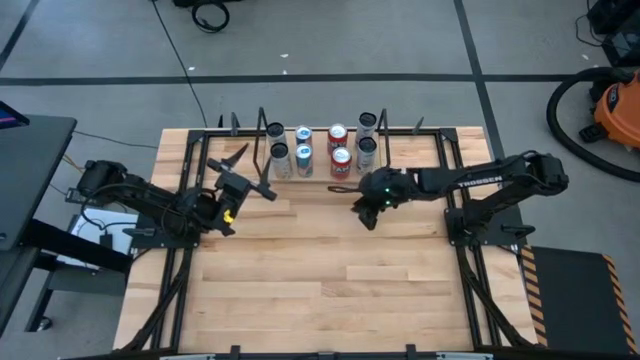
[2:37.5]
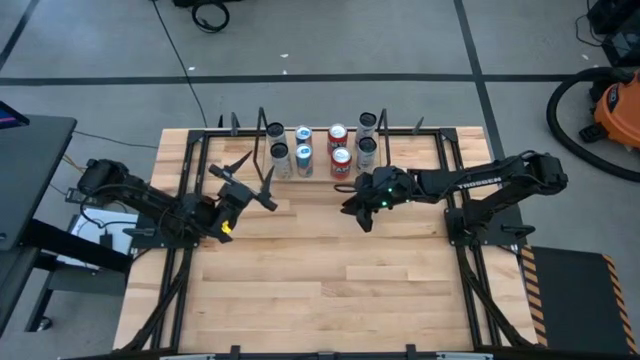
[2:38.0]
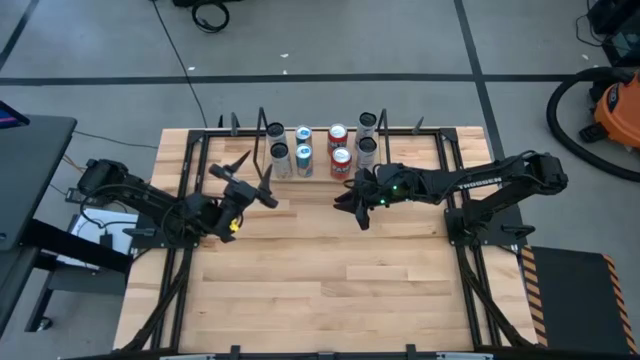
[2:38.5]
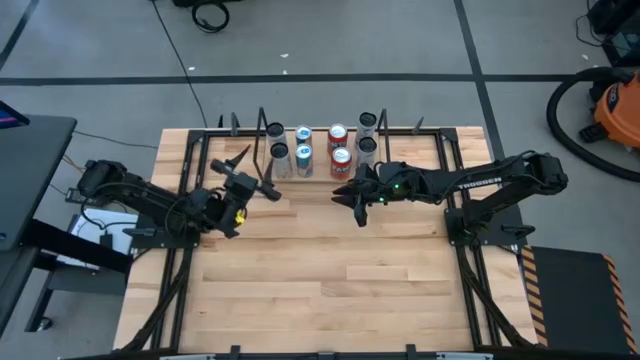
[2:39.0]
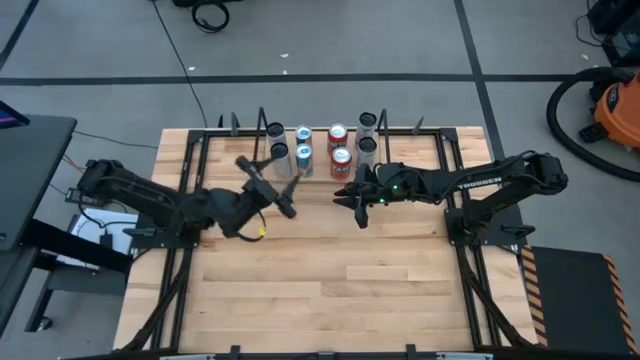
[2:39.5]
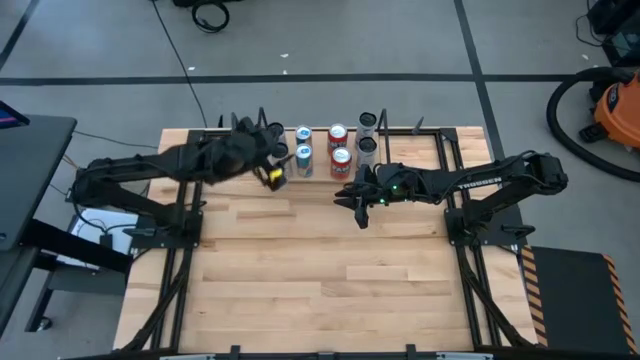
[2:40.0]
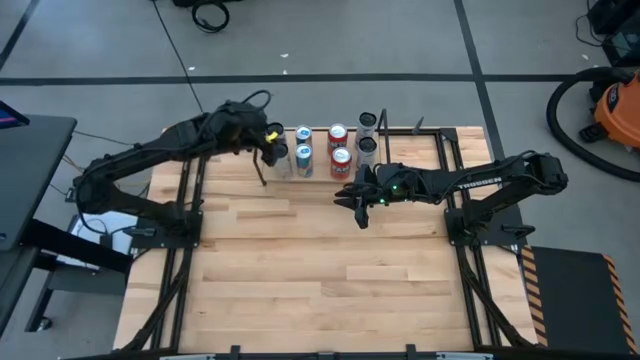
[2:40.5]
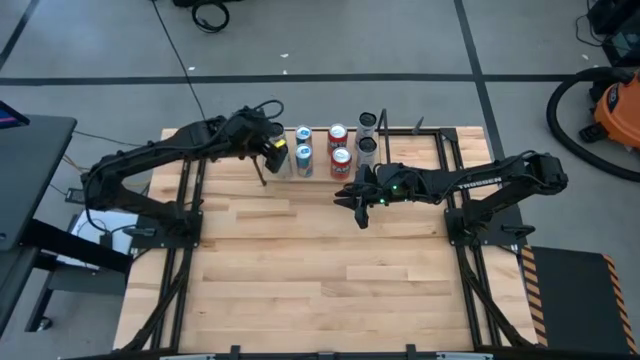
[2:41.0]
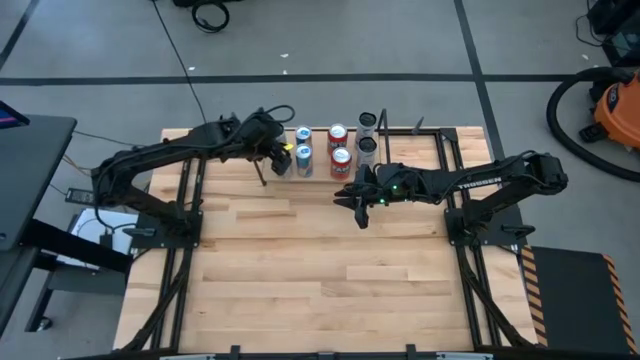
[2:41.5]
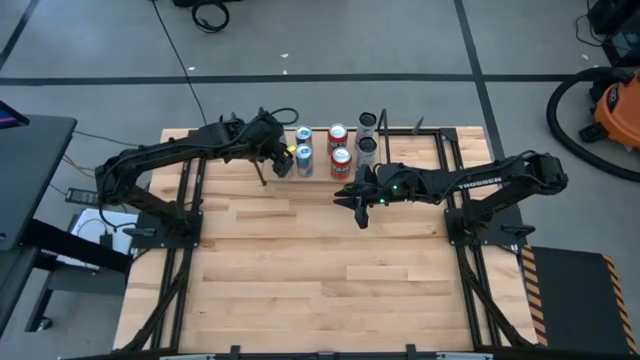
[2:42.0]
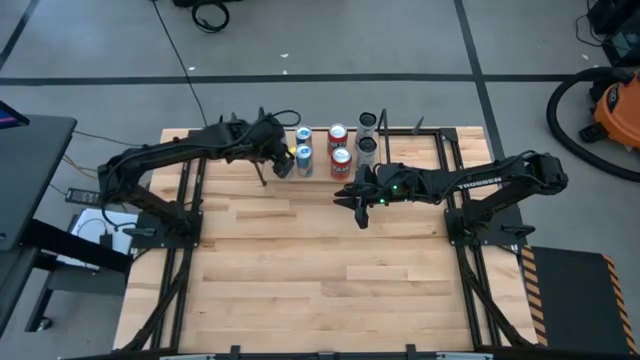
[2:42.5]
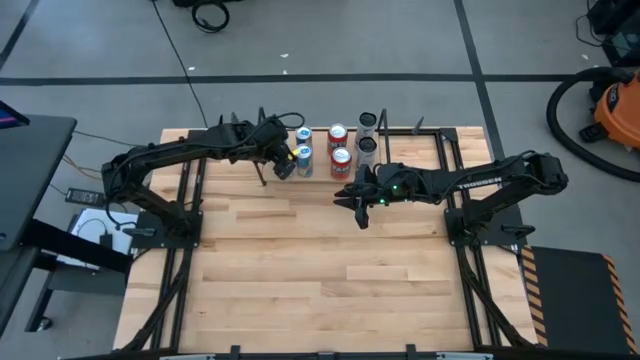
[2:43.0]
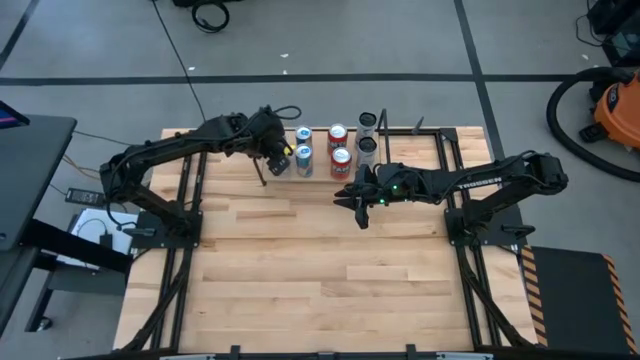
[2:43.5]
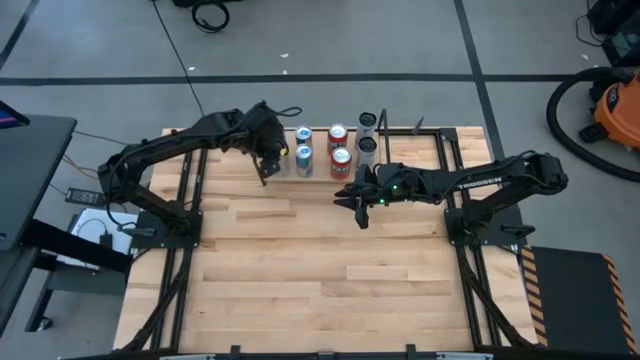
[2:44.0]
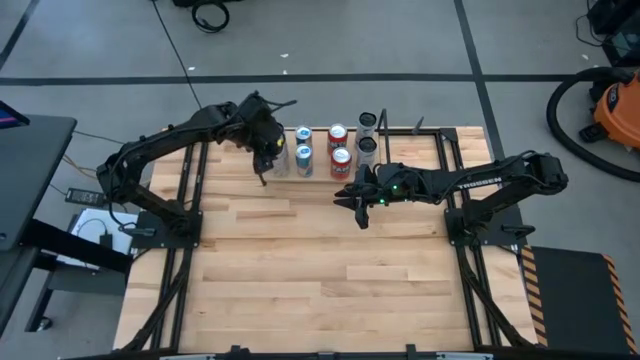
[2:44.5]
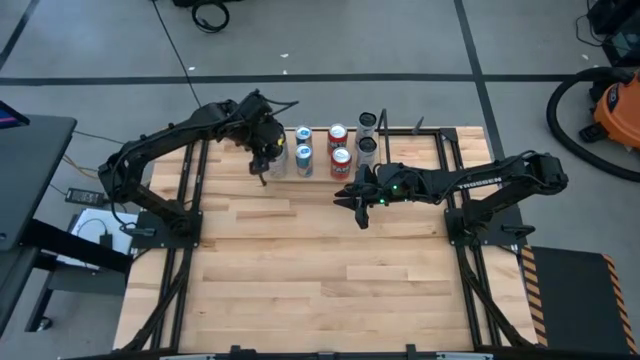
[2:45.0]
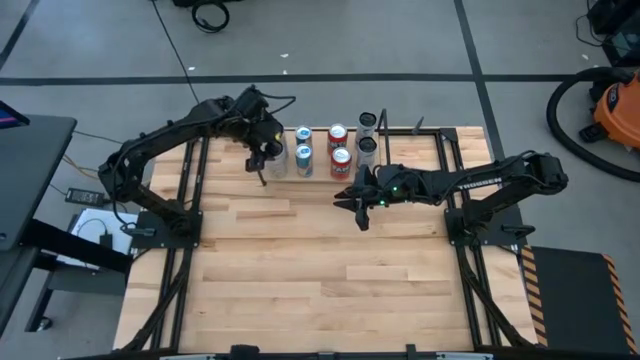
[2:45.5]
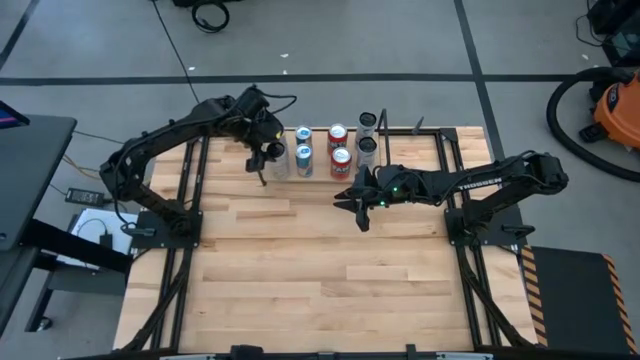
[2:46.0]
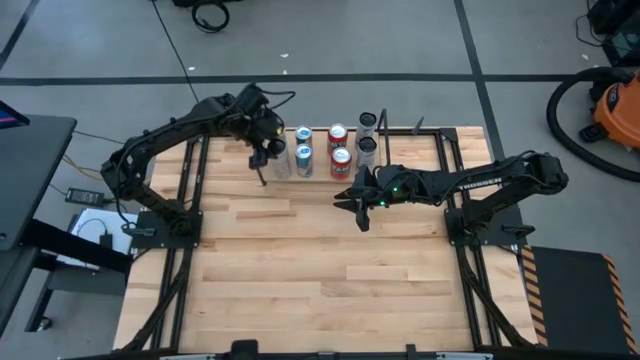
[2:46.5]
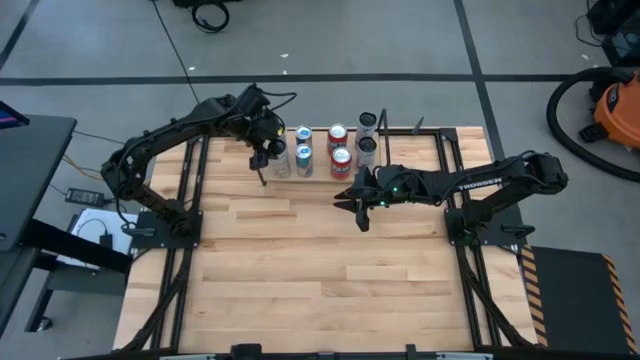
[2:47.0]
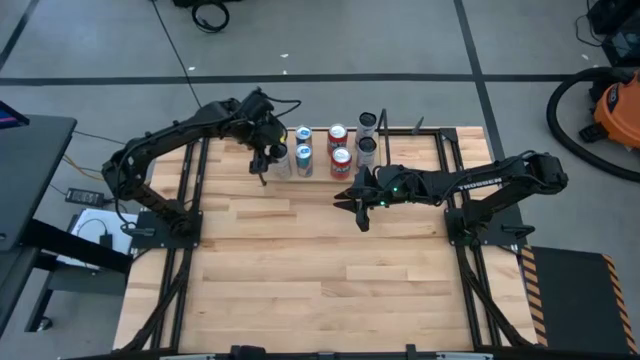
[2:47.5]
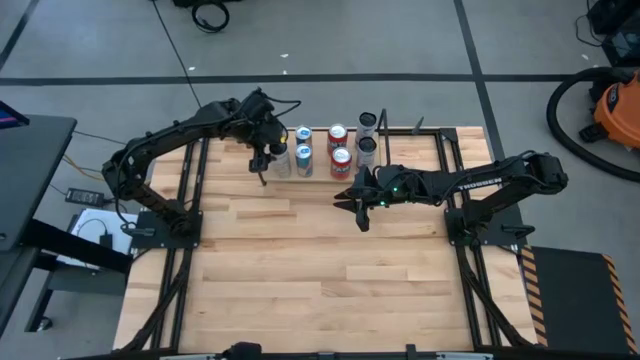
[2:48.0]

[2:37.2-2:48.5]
Task: Place canned beverage on shelf
Adjust the white yellow soda can on the shelf

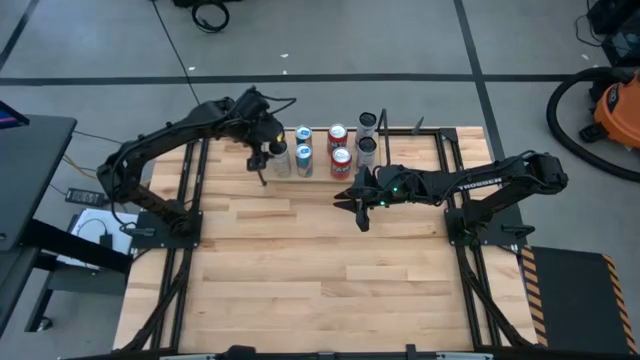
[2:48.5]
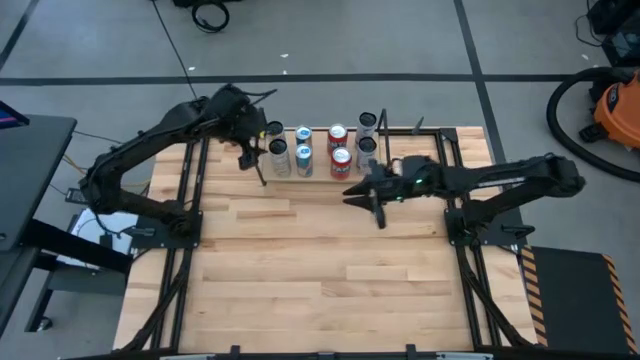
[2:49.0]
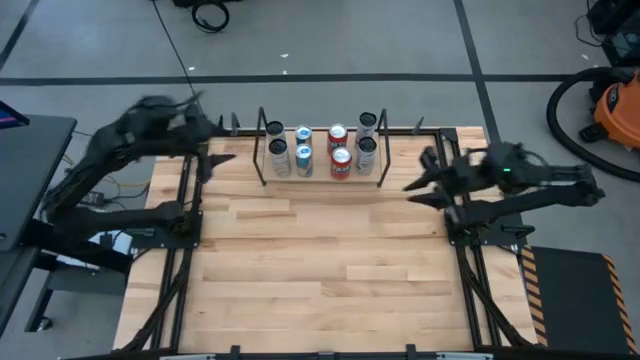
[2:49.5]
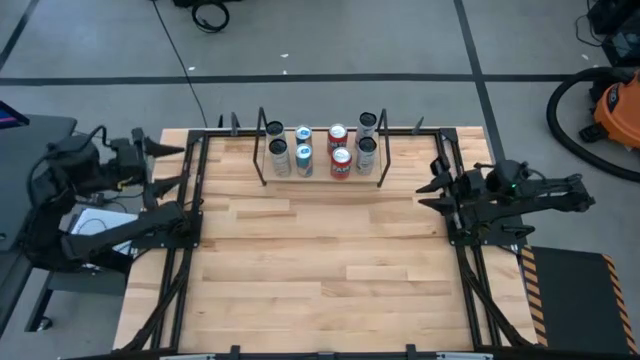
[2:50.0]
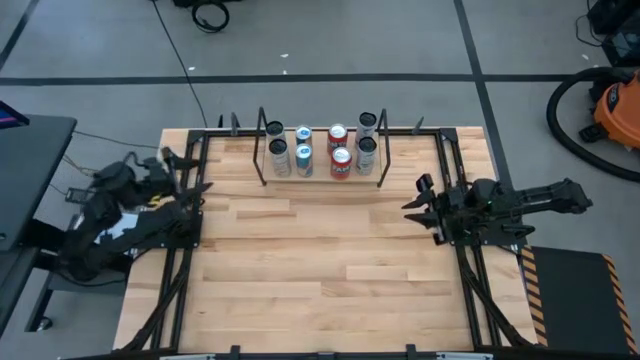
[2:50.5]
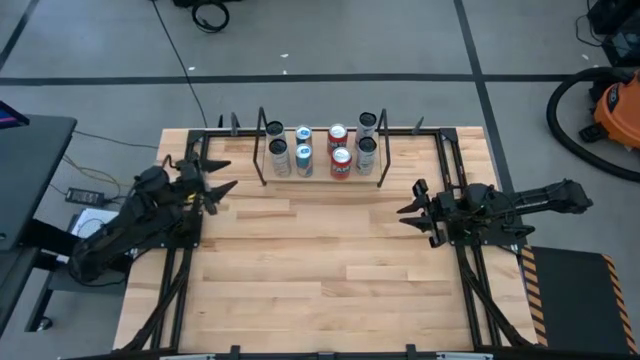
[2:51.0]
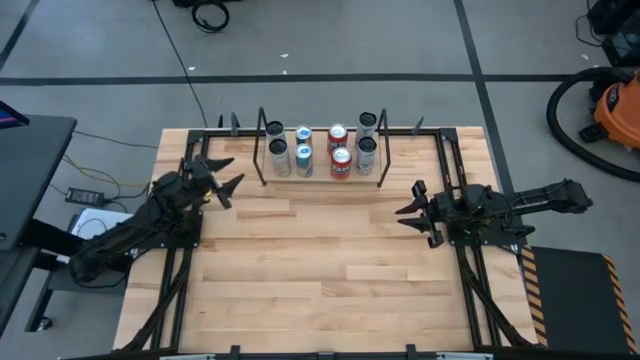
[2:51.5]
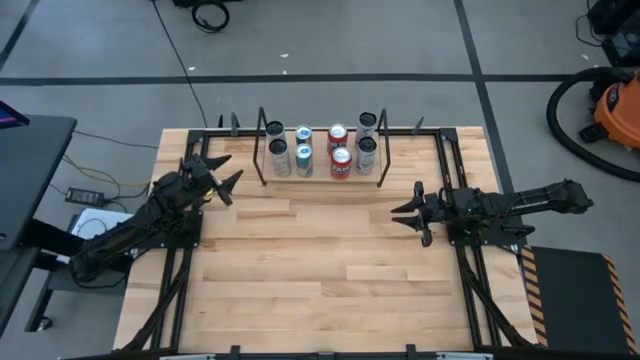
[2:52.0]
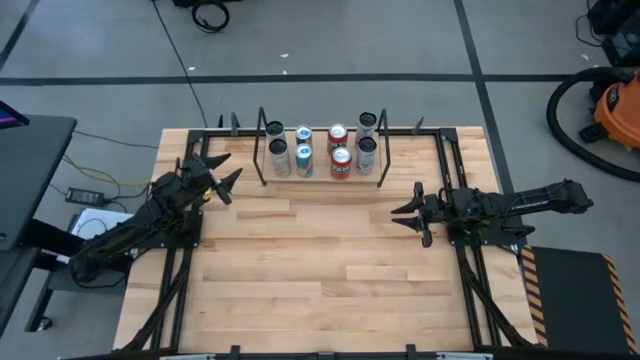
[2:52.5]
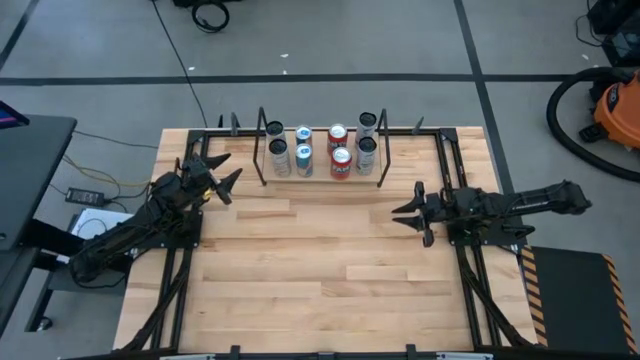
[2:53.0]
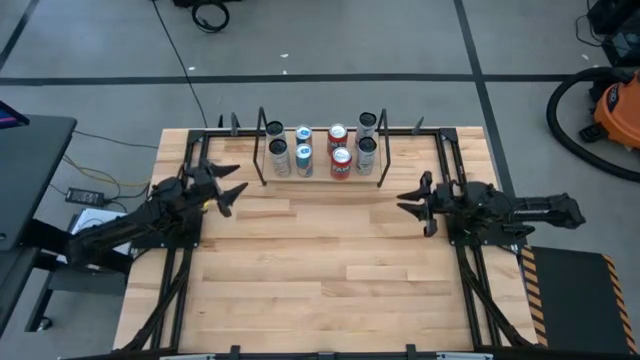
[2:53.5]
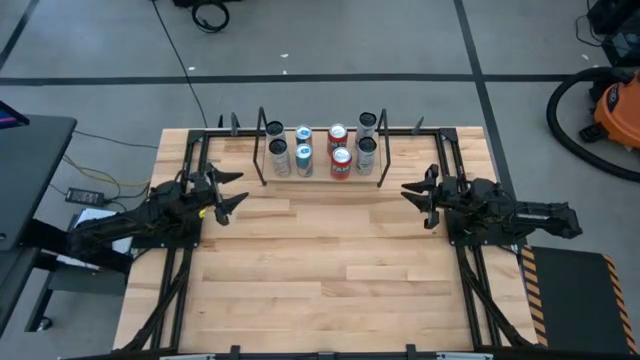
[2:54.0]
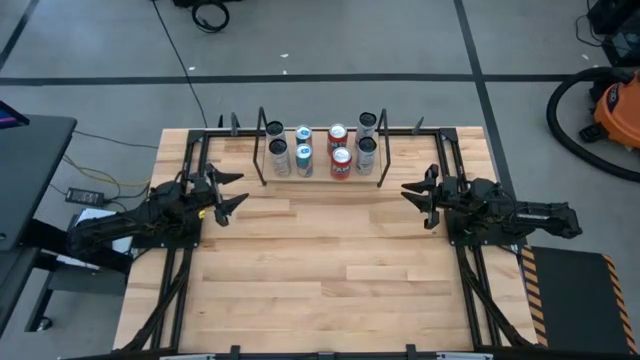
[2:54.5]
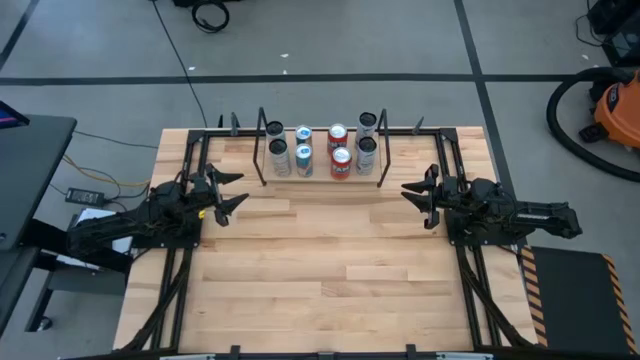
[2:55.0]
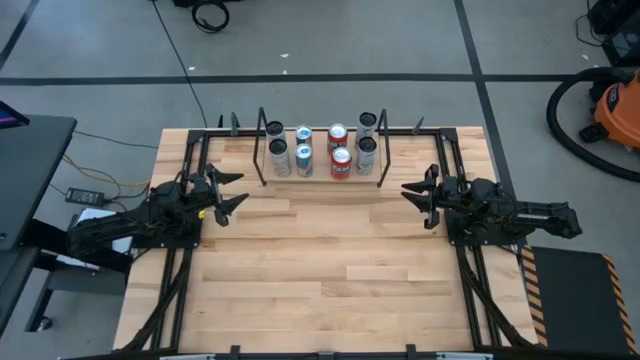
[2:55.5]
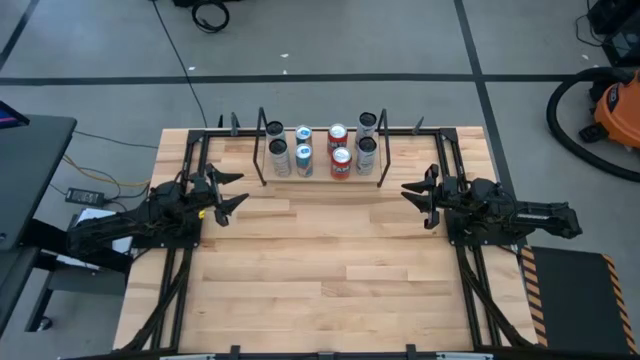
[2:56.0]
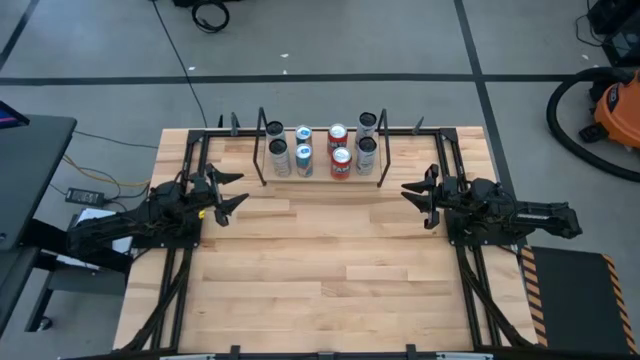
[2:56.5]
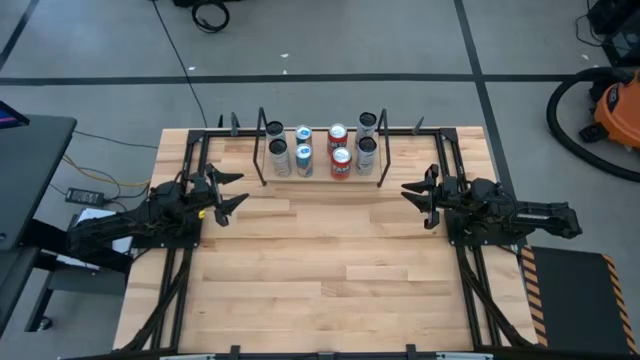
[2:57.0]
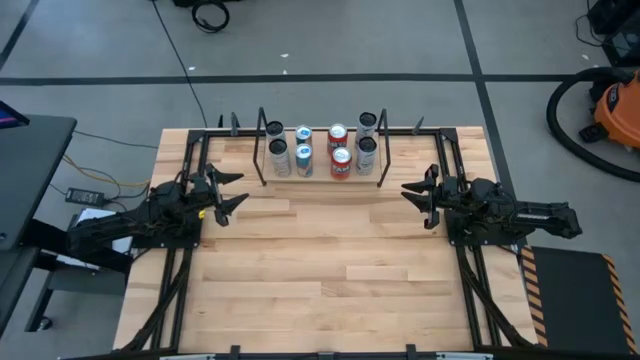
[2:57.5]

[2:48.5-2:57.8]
Return to Home Position

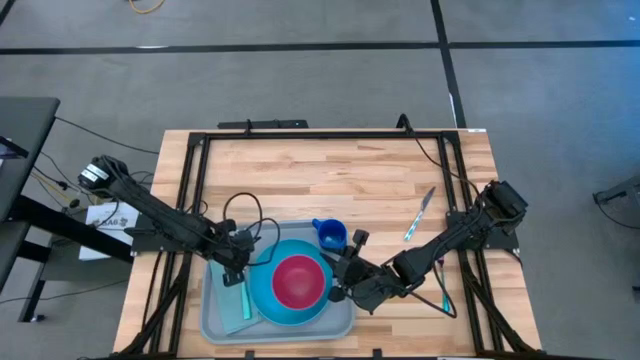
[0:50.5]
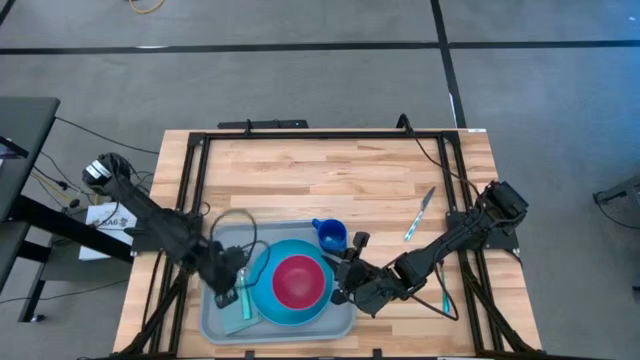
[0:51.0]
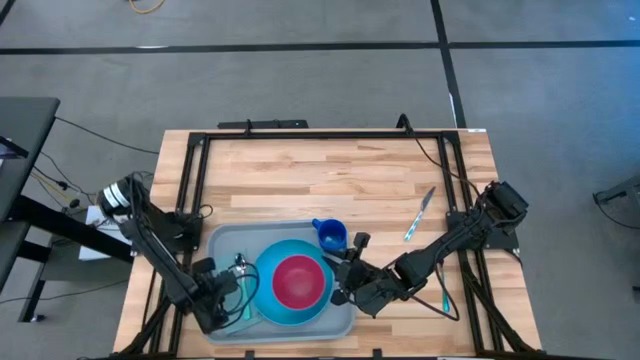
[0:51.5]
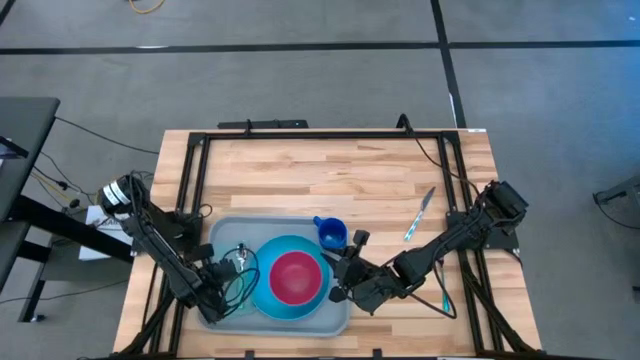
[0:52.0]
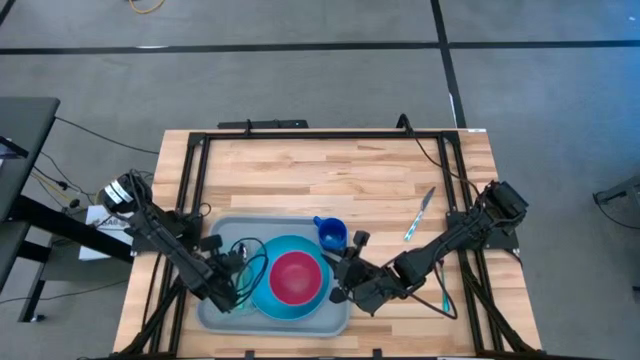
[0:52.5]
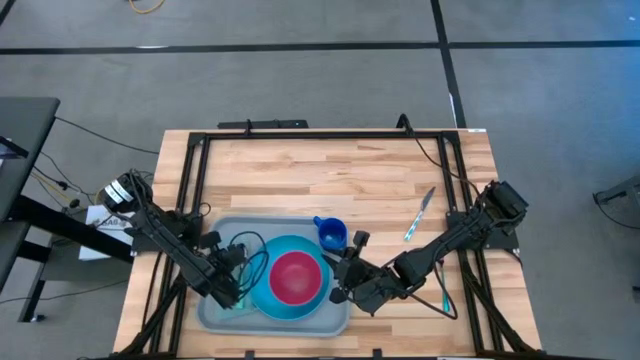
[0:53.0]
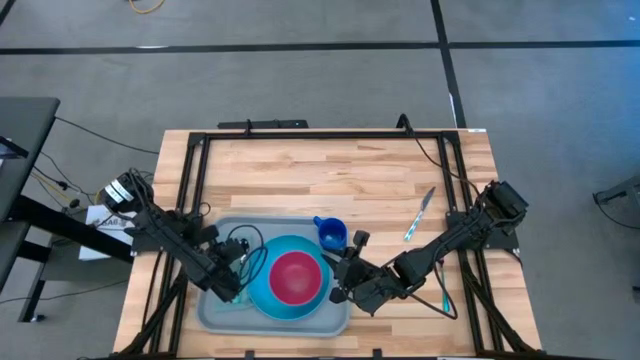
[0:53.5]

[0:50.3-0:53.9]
Task: Set up tray
Adjust the blue napkin on the gray serving tray
